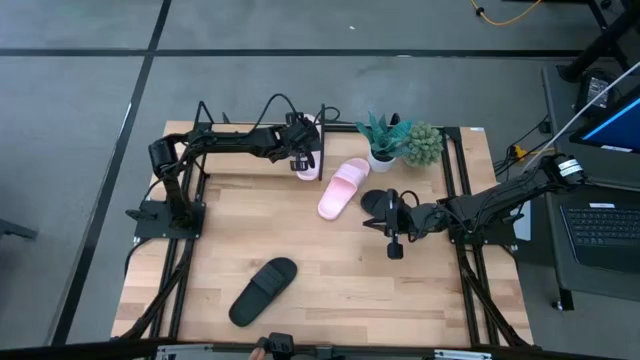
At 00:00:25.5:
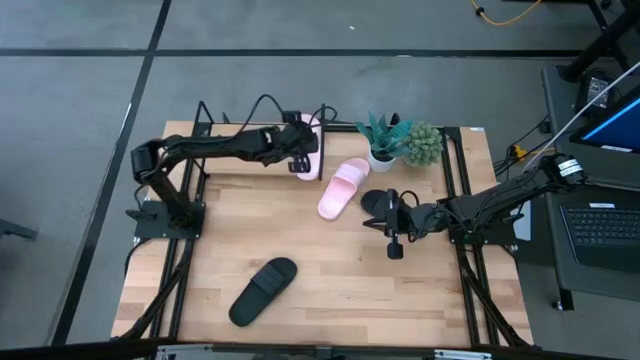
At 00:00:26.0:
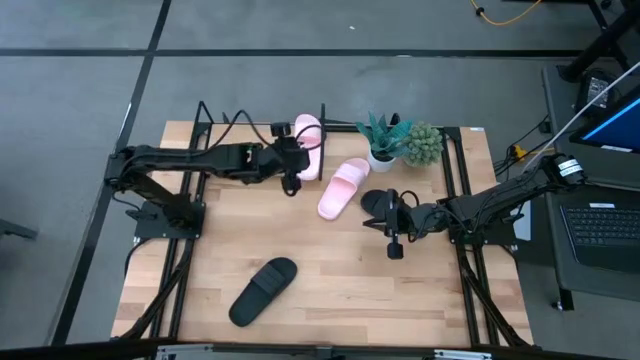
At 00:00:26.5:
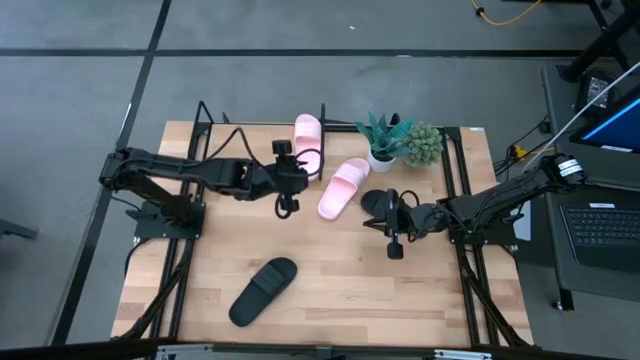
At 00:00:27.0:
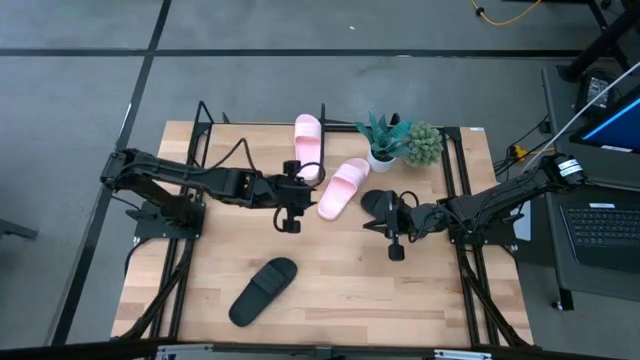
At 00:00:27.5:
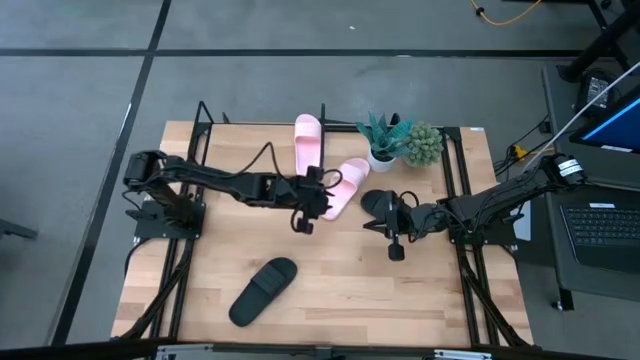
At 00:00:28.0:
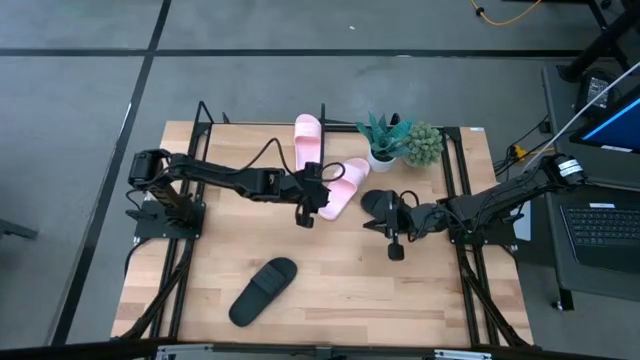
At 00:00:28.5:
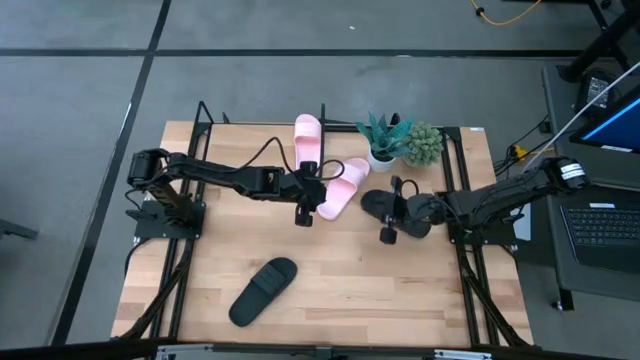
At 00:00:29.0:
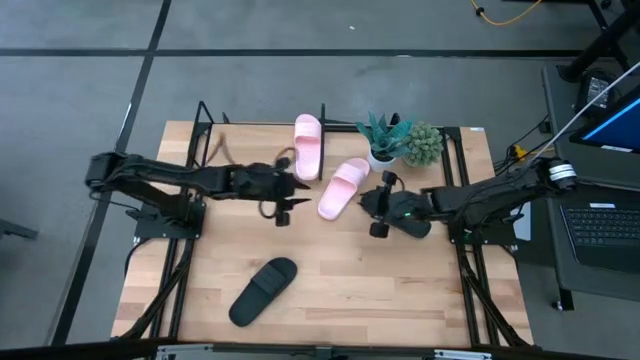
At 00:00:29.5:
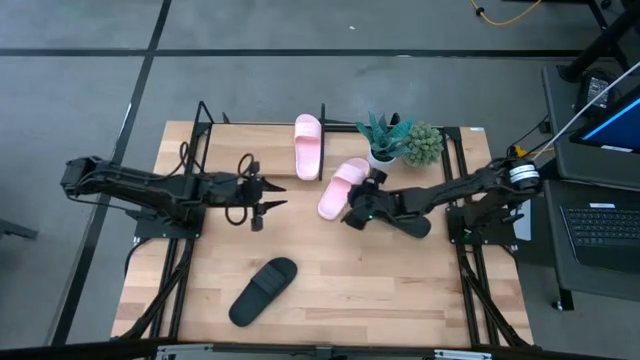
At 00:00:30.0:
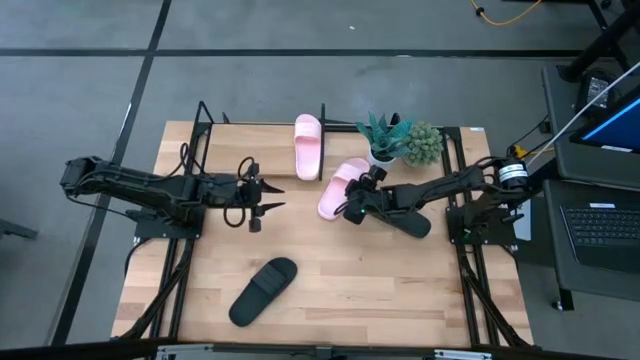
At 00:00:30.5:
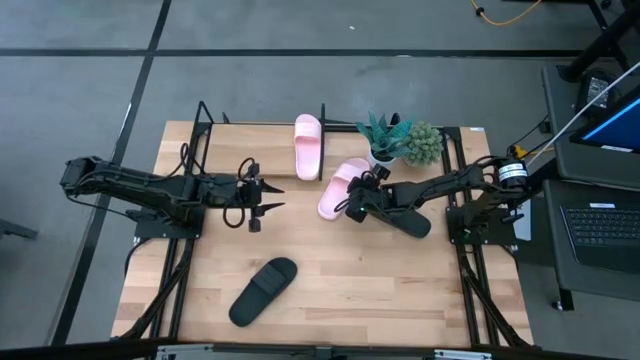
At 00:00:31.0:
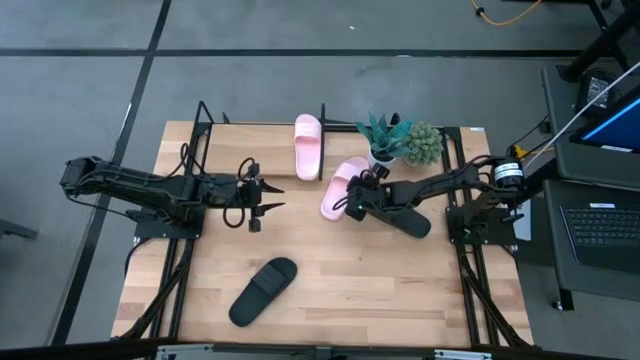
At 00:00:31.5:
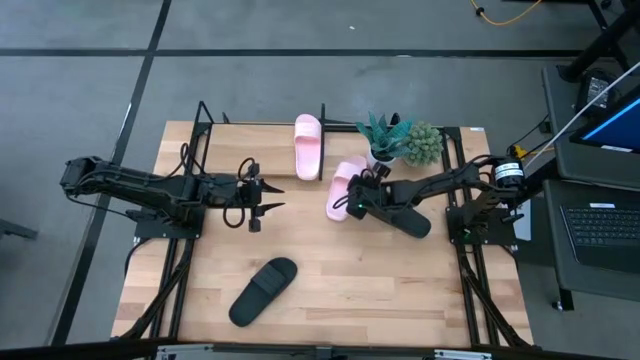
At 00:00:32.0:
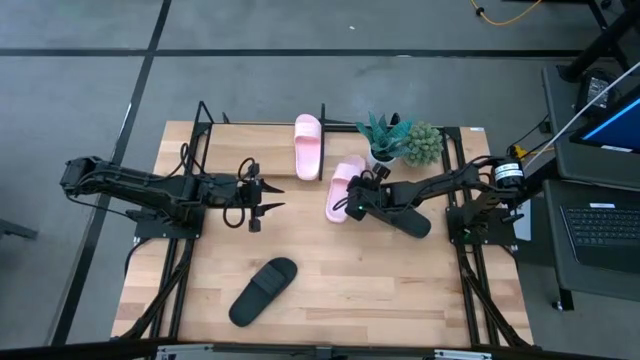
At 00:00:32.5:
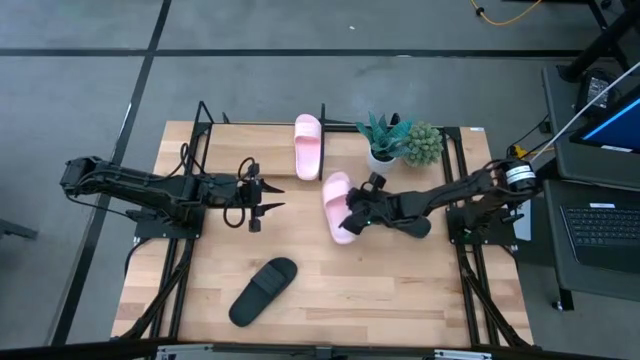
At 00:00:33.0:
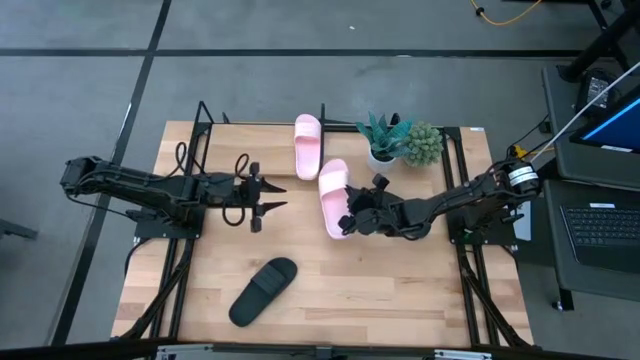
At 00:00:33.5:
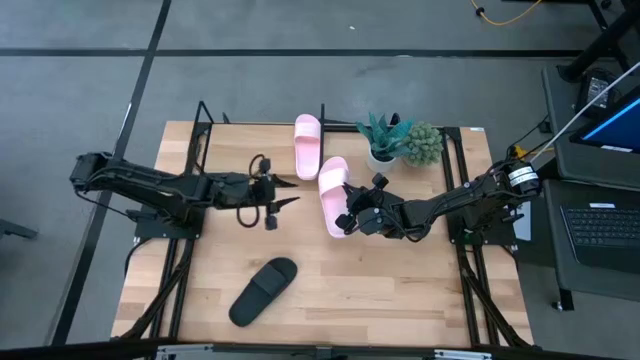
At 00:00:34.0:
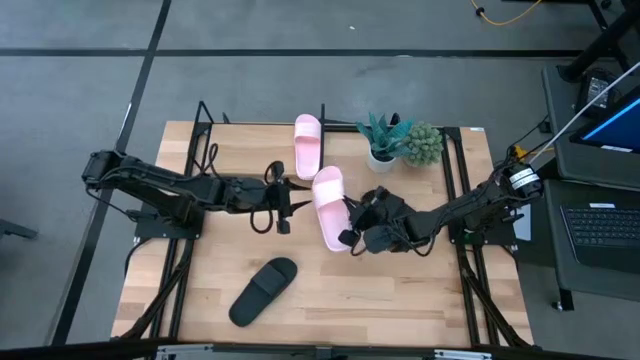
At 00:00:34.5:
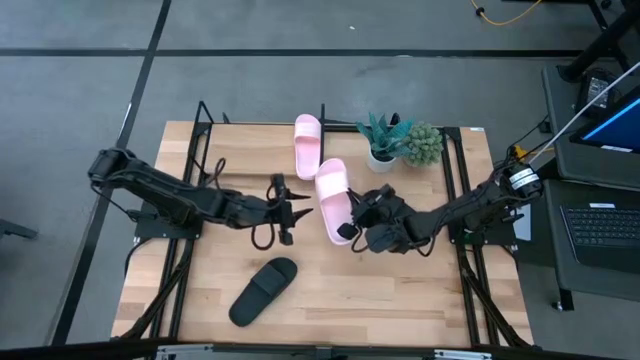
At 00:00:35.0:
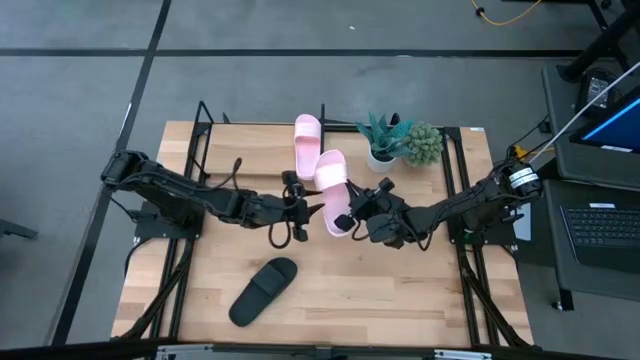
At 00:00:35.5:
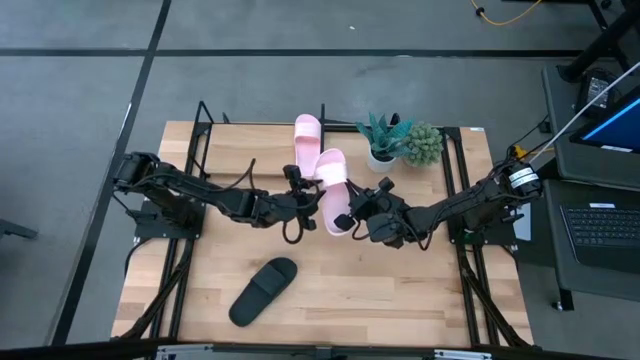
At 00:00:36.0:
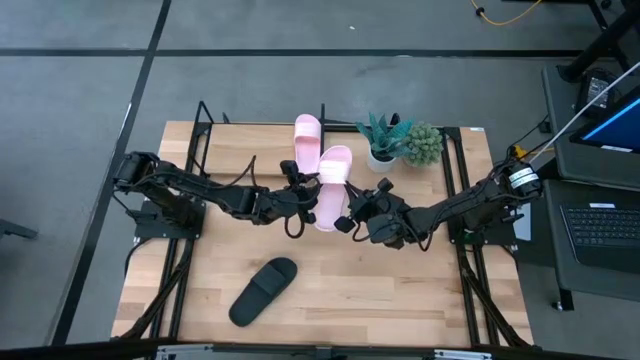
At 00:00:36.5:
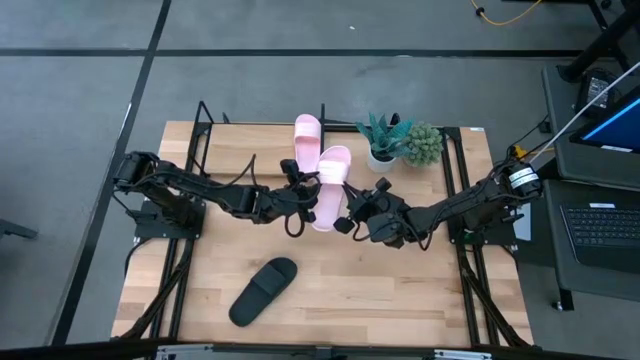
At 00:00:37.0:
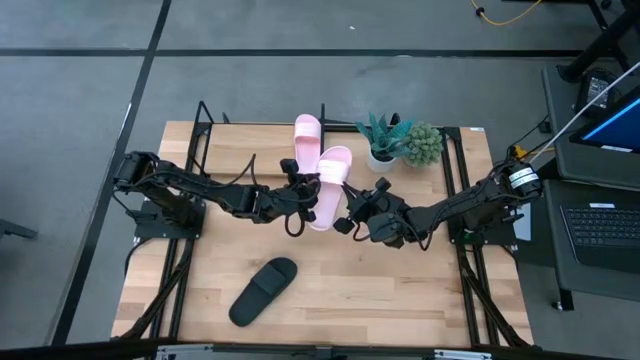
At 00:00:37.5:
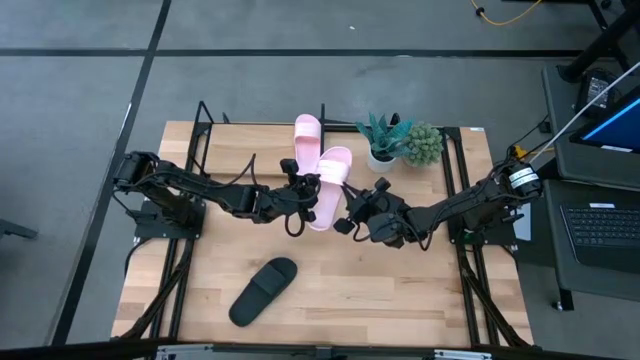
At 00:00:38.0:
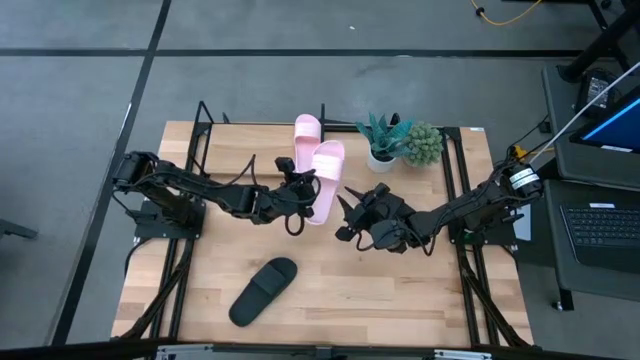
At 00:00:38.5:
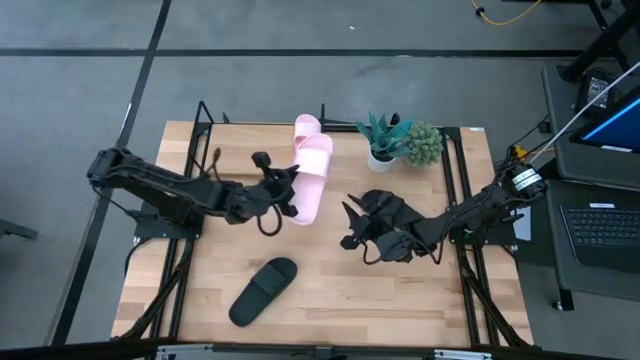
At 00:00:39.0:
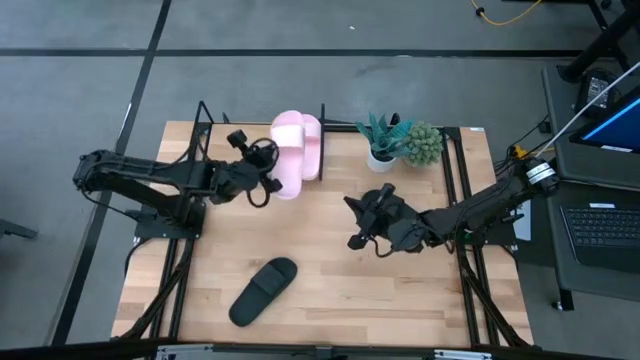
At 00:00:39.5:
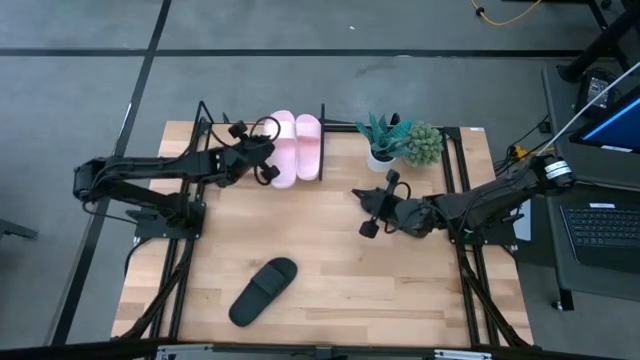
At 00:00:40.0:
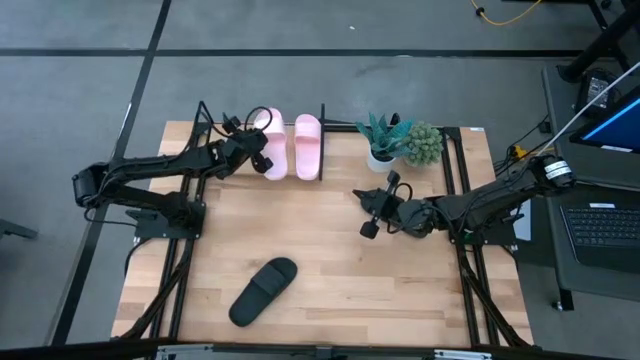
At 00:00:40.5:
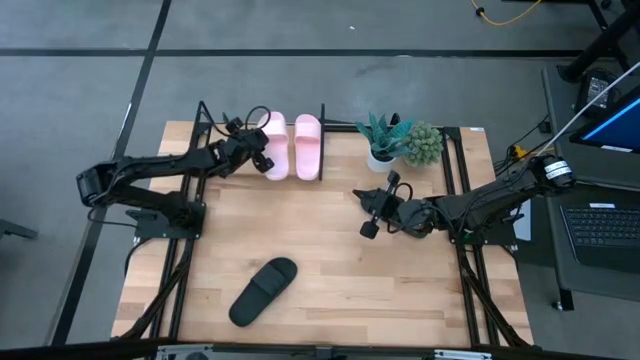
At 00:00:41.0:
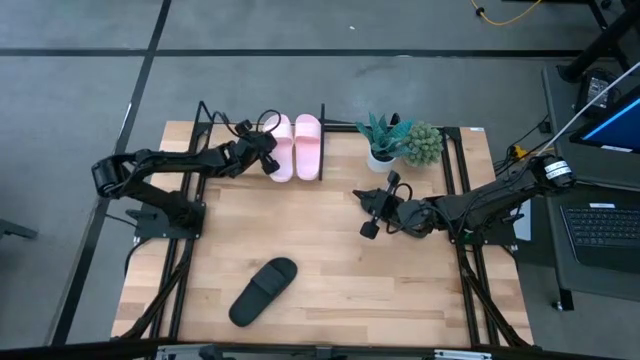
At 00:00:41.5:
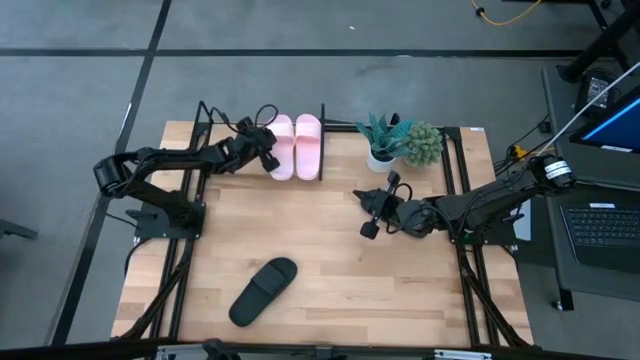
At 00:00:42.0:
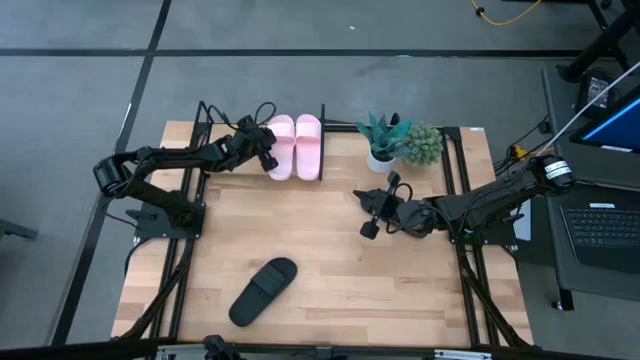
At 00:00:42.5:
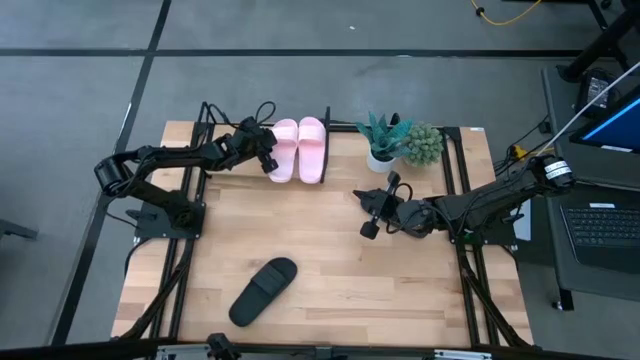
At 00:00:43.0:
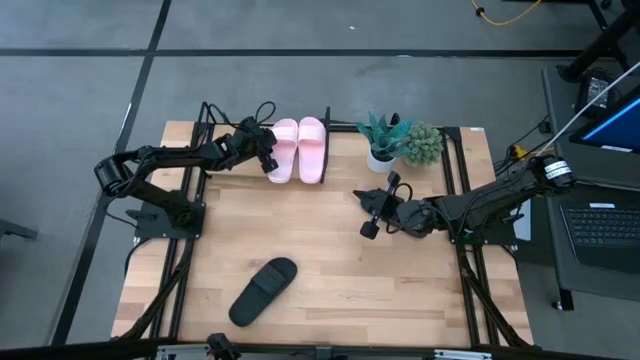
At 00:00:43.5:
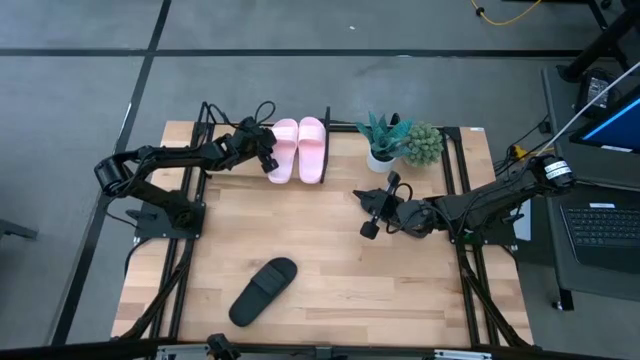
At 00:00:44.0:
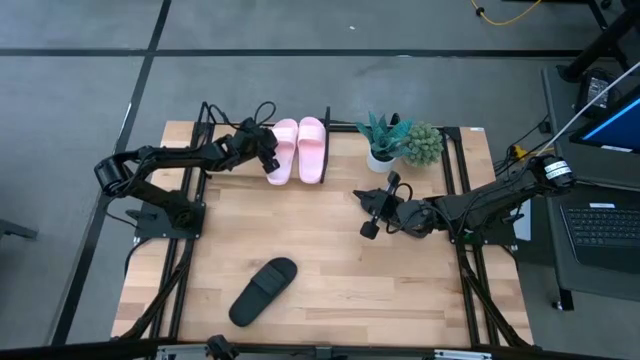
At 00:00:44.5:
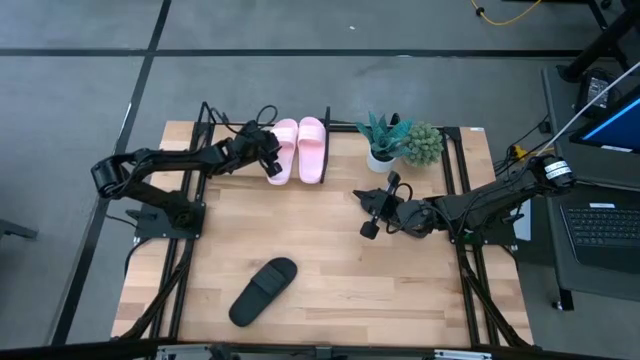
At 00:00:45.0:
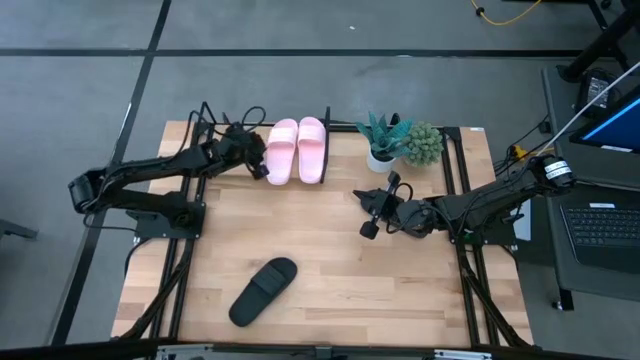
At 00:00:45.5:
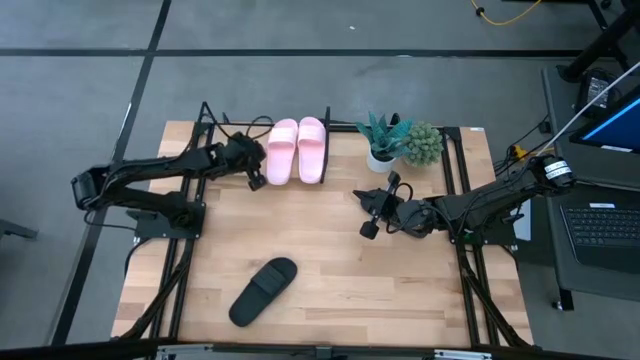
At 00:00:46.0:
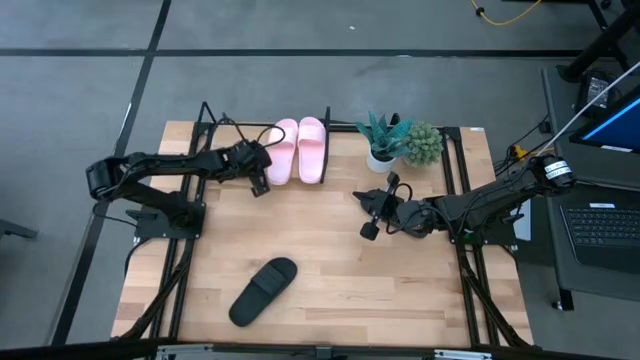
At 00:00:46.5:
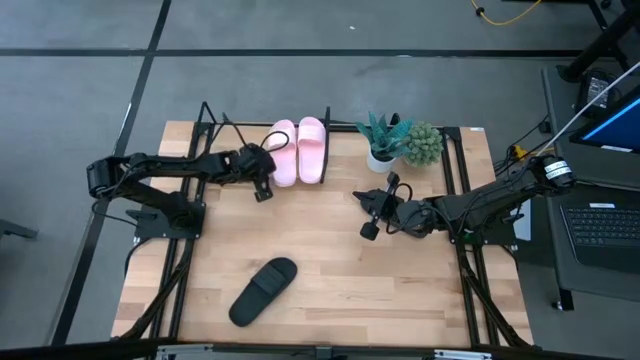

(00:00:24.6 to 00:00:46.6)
Task: Pick and place slides into the shelf
Put the pink slide on the shelf
